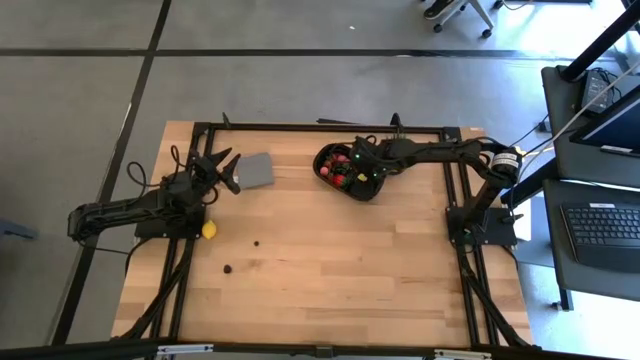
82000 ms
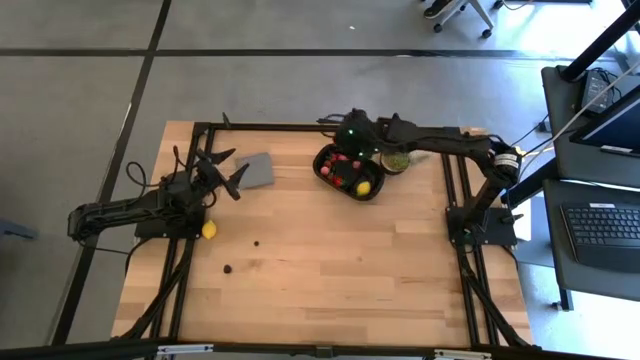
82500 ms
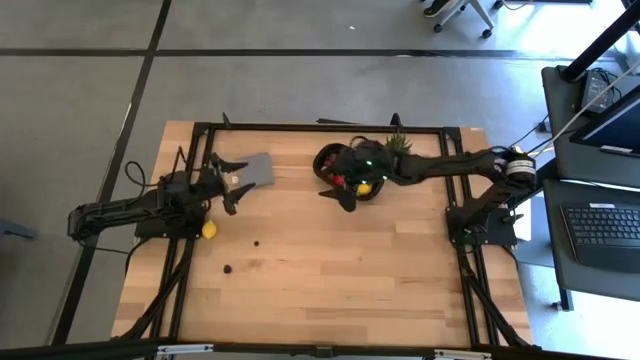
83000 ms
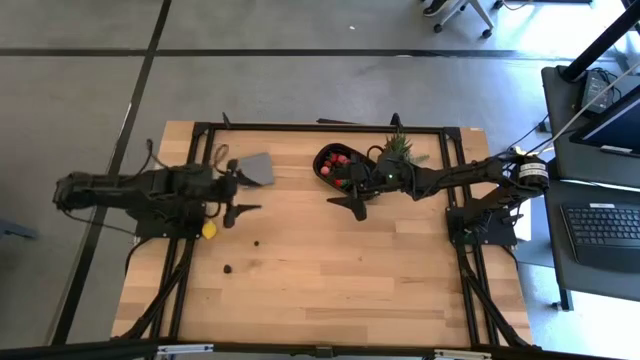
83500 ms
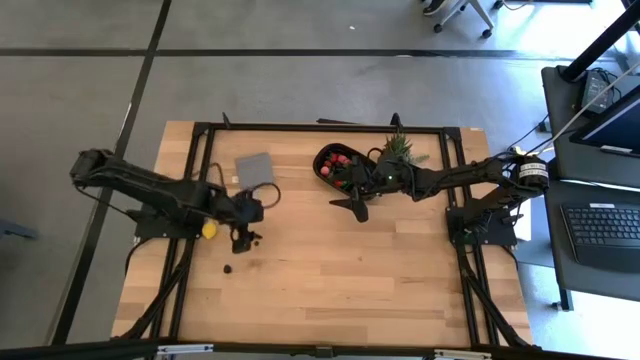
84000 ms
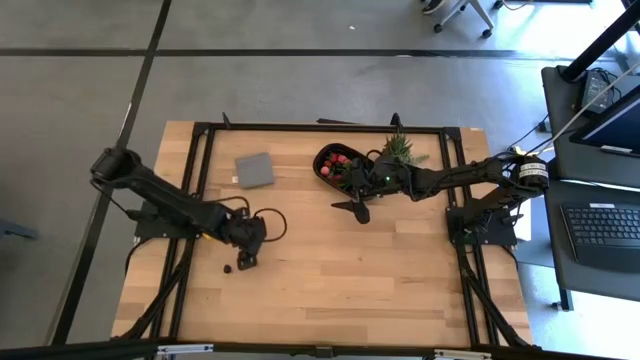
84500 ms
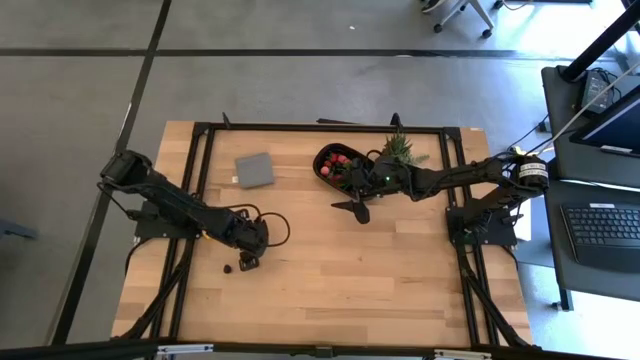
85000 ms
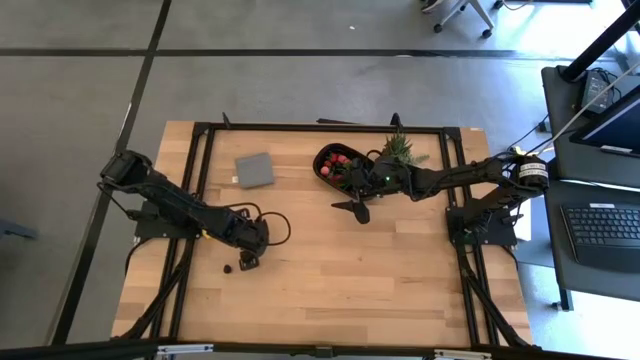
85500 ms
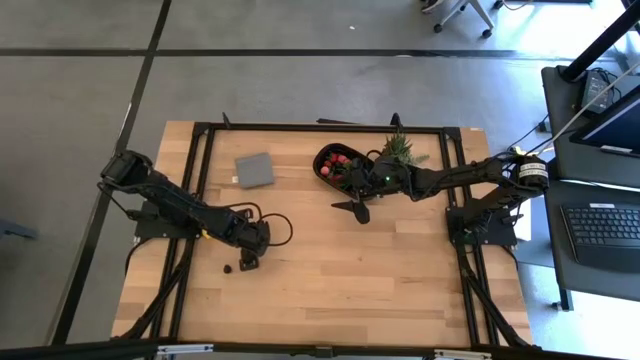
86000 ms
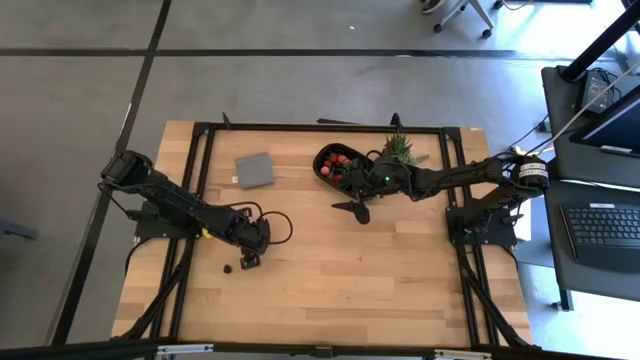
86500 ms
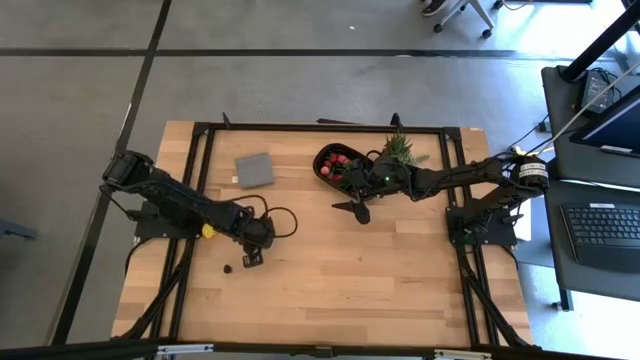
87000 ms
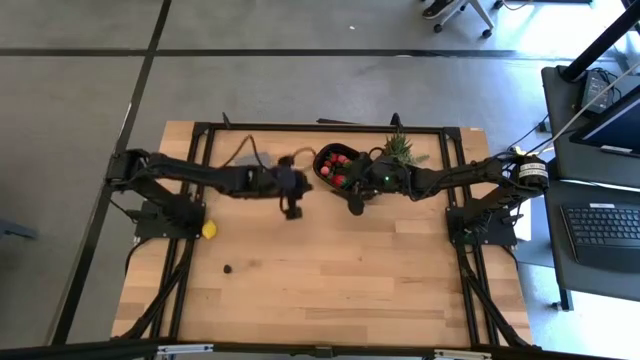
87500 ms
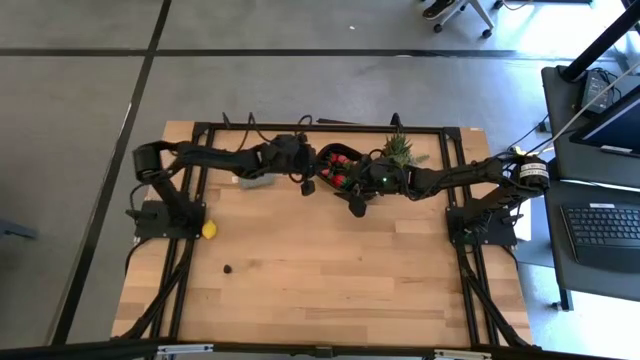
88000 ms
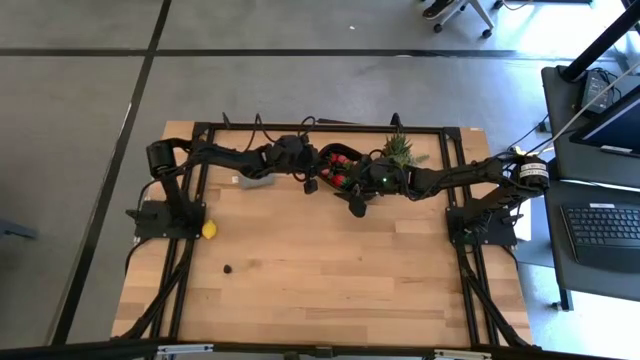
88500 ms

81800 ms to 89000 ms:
Task: Pick and placing Produce into tupperware
Put the blueberry into the black bin

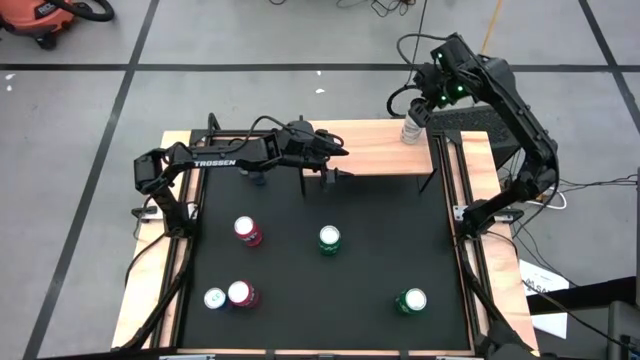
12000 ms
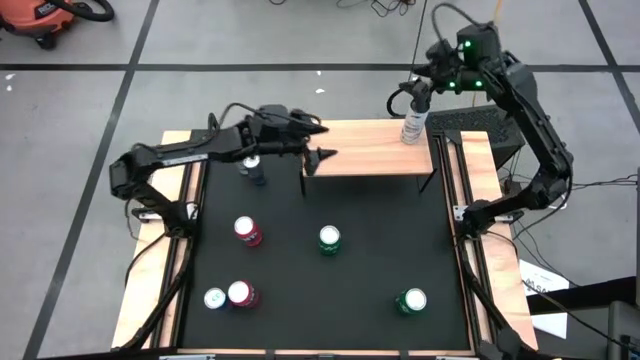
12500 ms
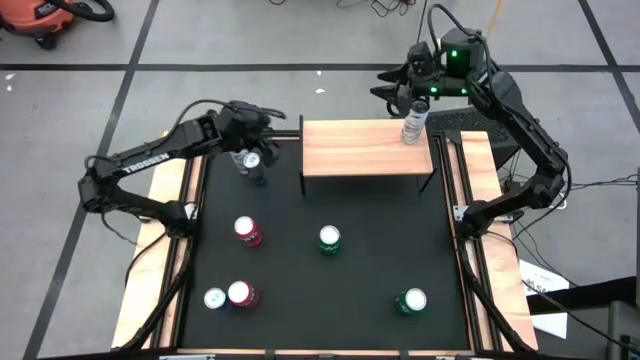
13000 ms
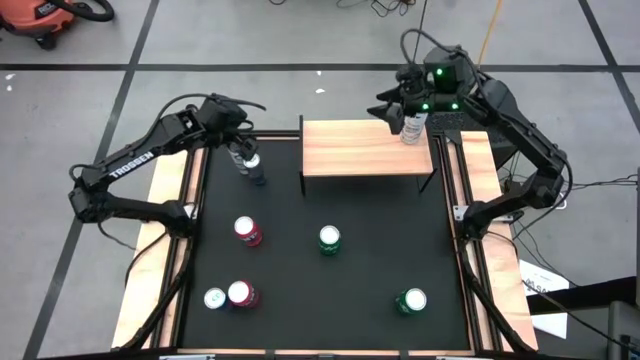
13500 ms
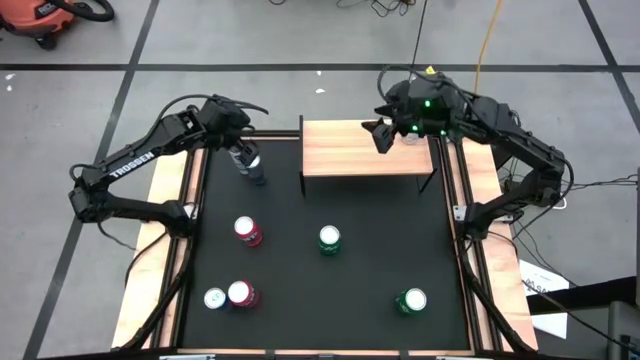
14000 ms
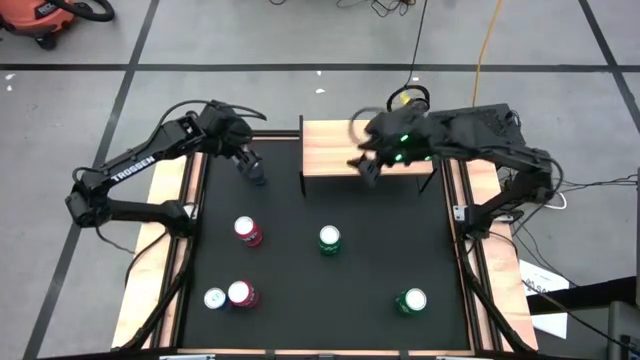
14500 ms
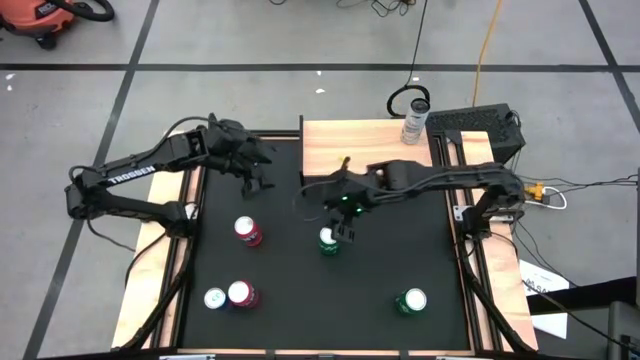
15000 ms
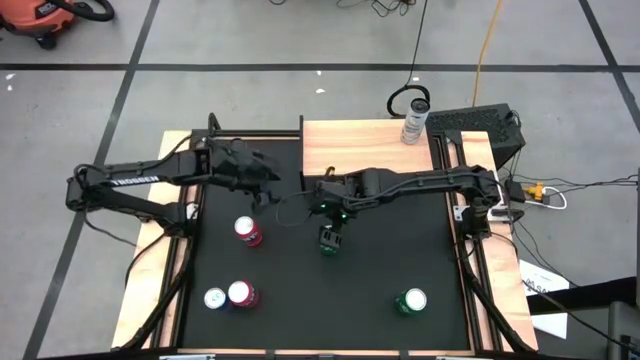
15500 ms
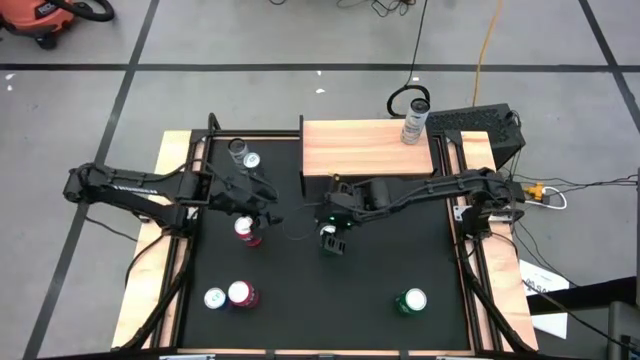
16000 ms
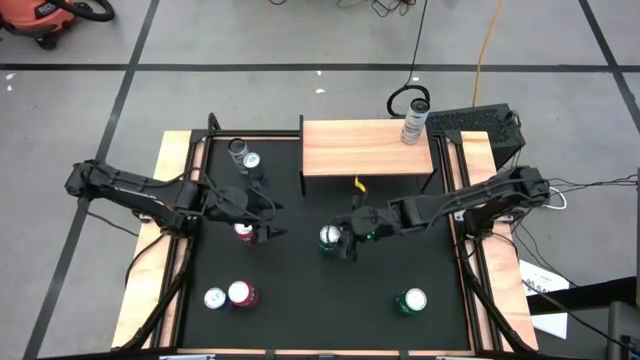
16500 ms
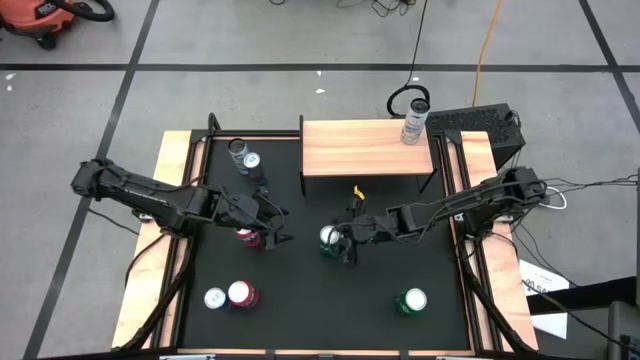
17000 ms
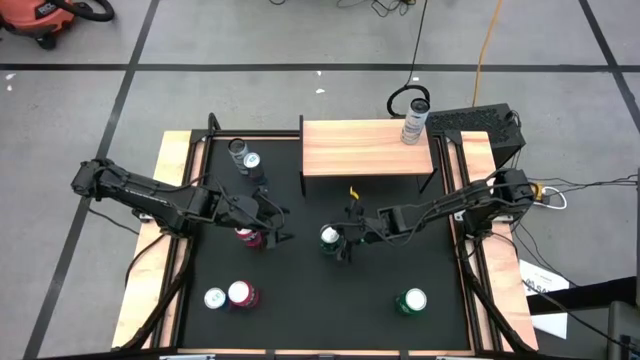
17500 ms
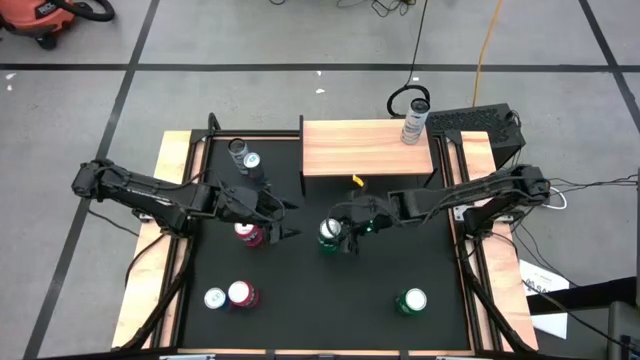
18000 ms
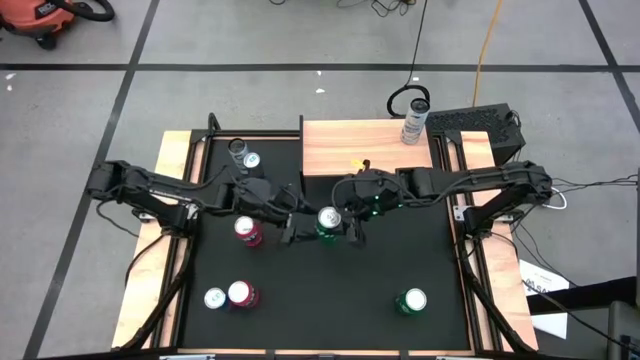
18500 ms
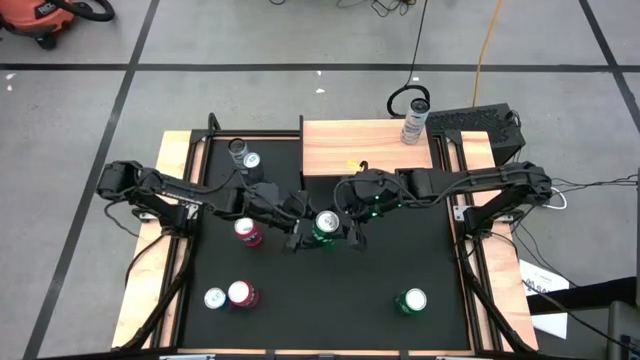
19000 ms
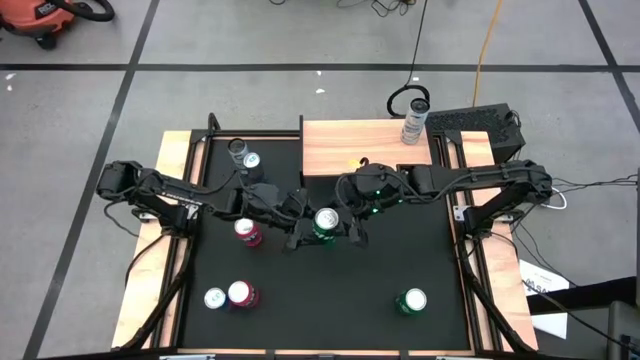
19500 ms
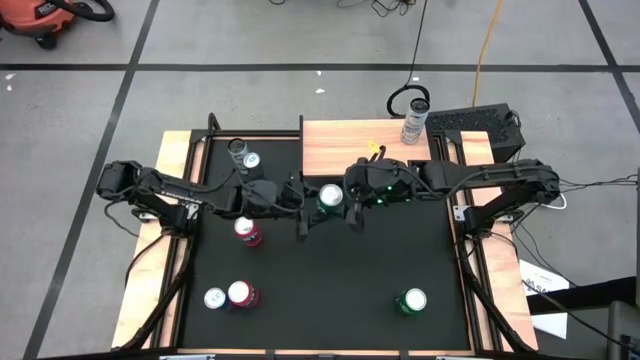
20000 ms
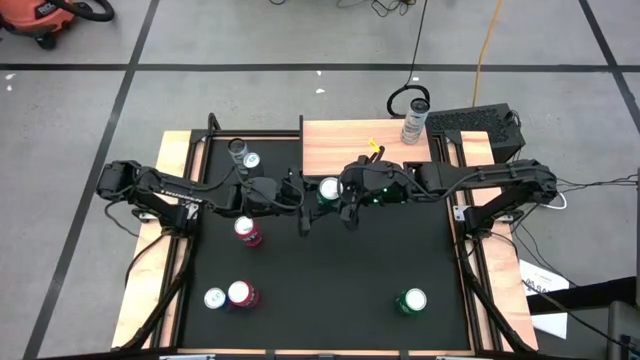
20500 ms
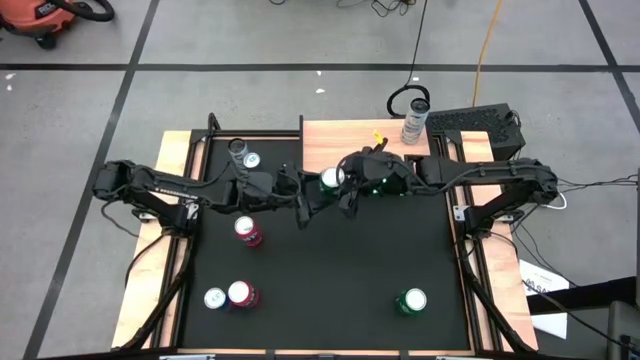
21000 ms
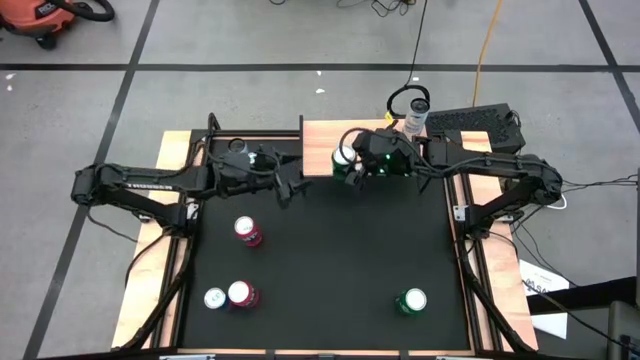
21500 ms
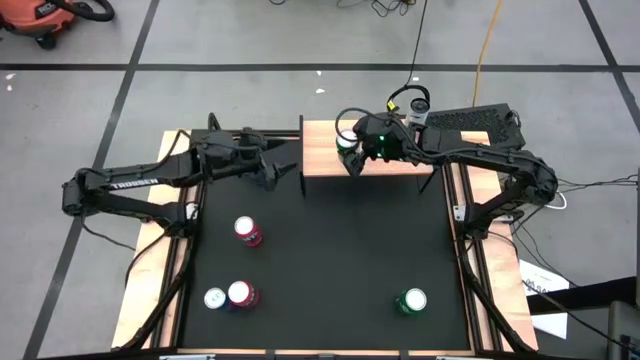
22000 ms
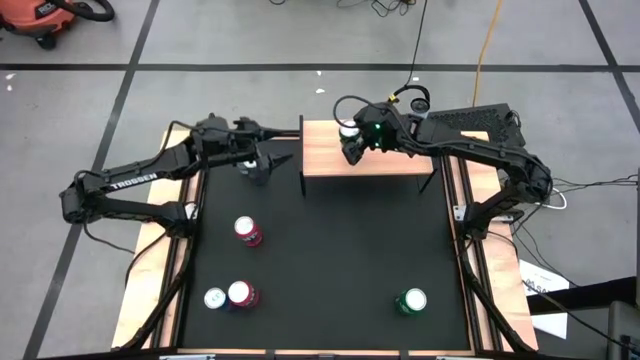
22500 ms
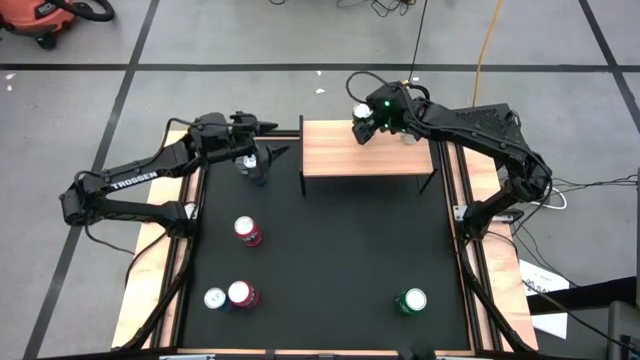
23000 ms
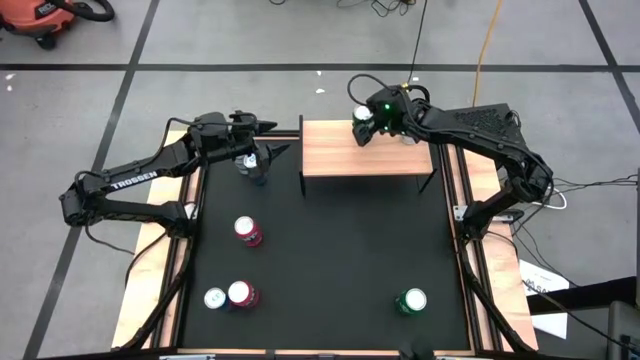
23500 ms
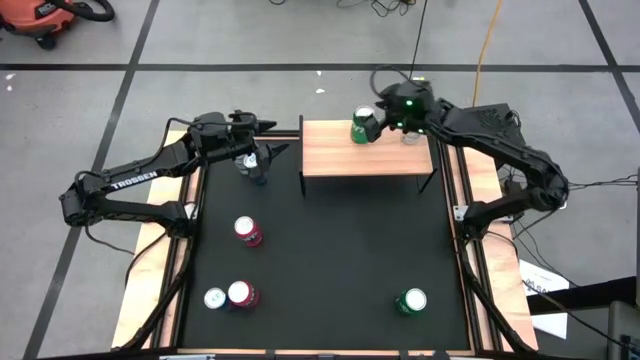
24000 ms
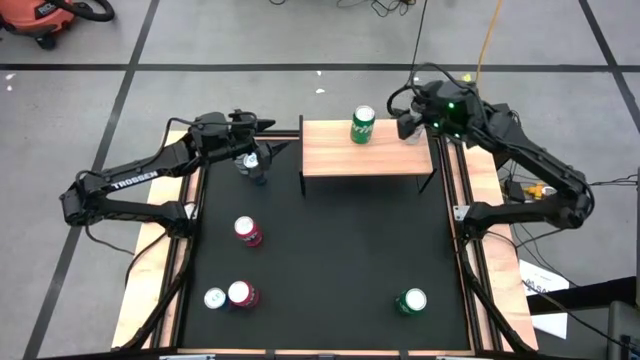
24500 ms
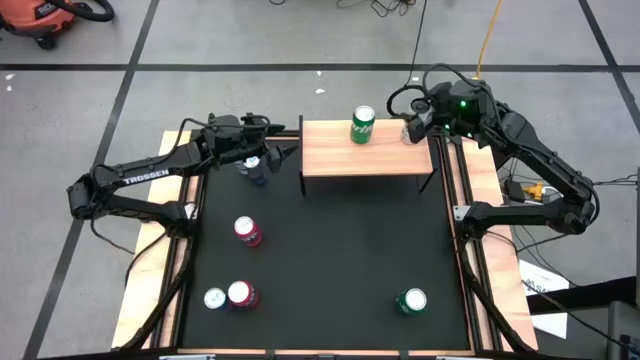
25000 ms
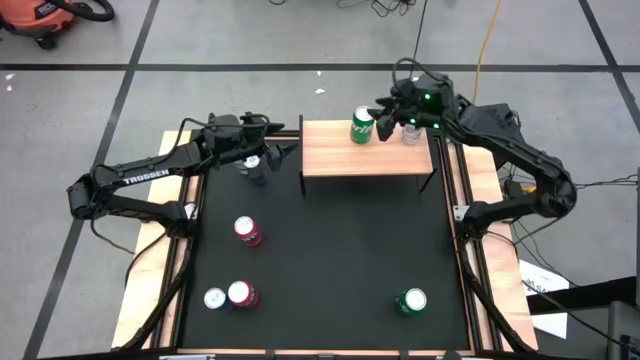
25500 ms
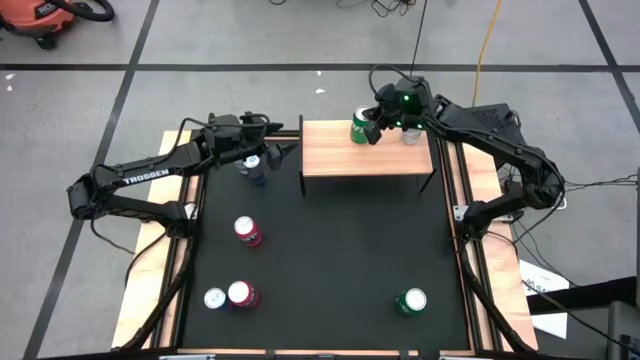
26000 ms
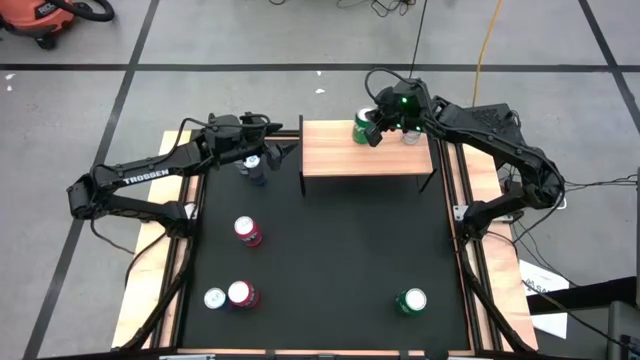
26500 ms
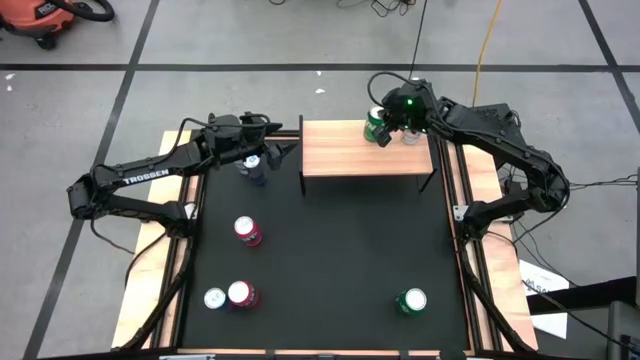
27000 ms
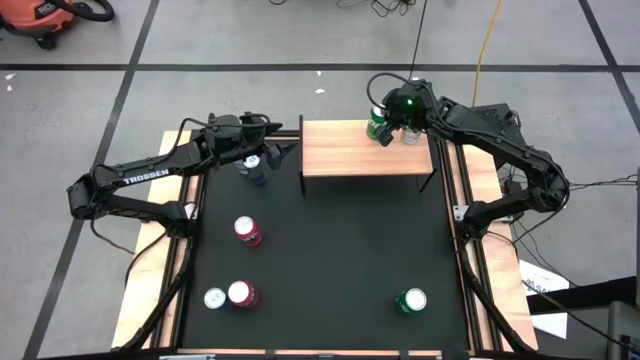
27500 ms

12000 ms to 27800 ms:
Task: Place canned beverage on shelf
Put the top green soda can on the shelf
